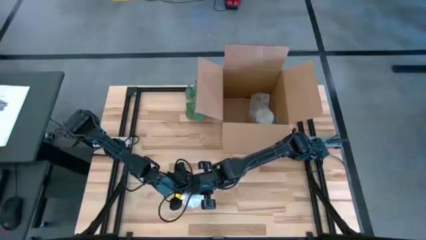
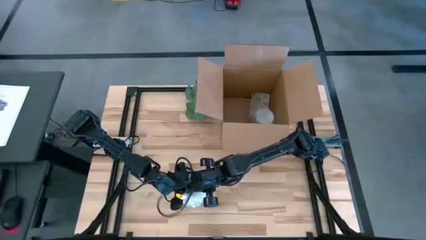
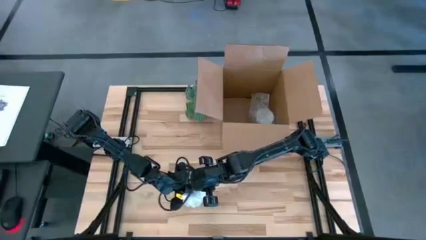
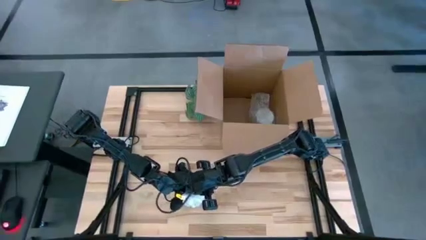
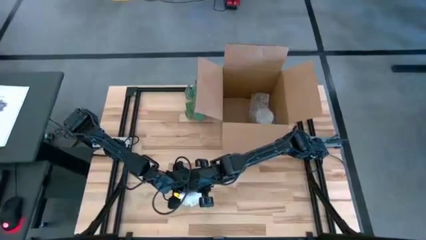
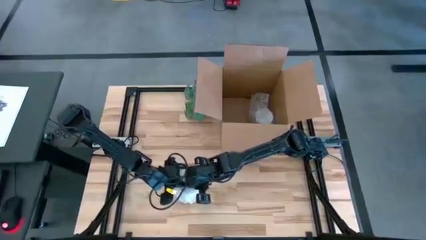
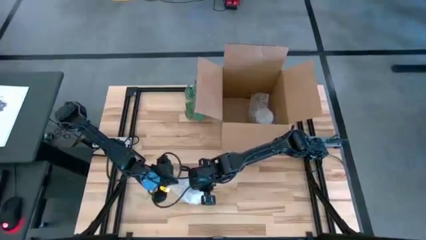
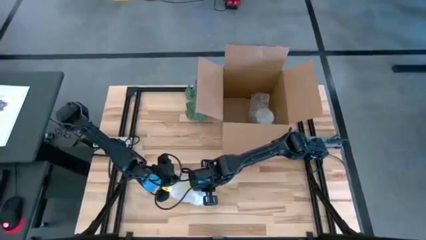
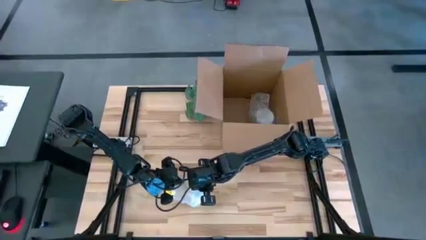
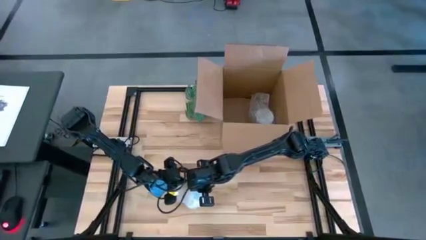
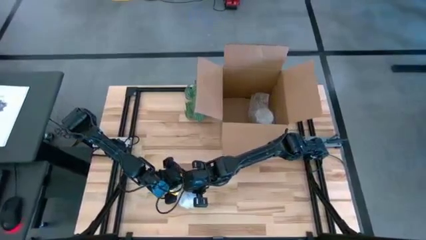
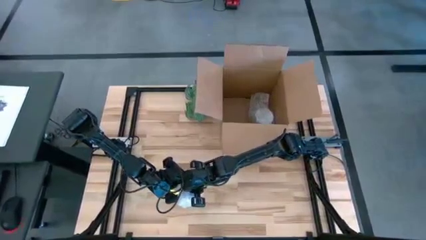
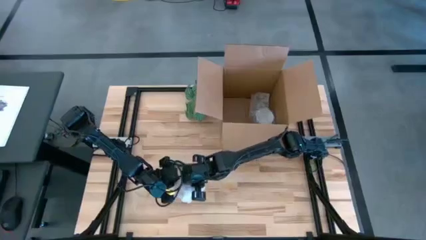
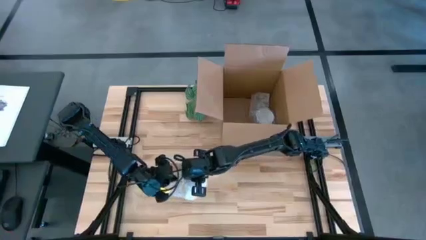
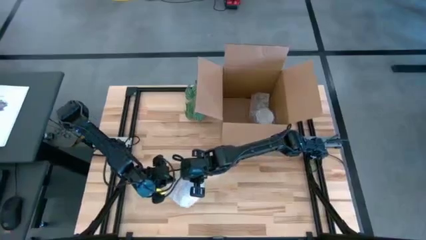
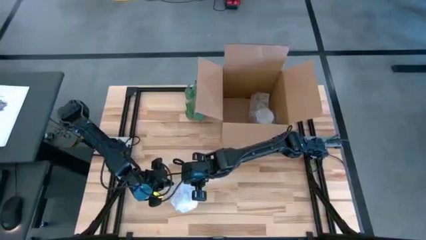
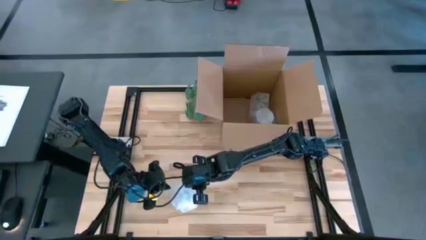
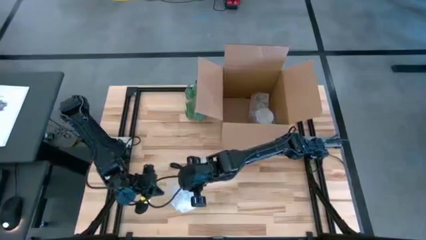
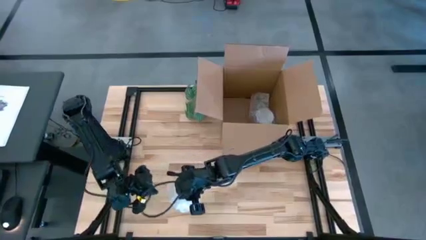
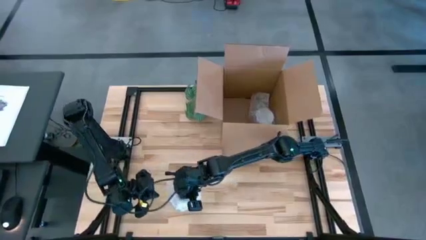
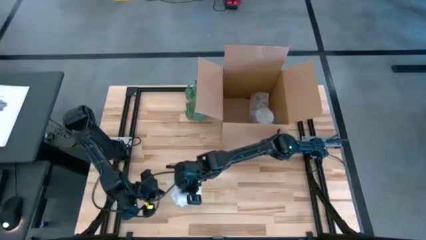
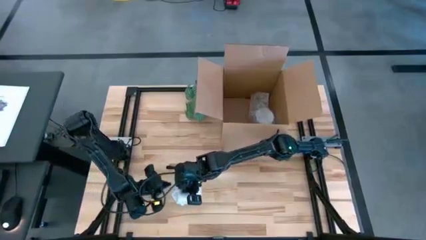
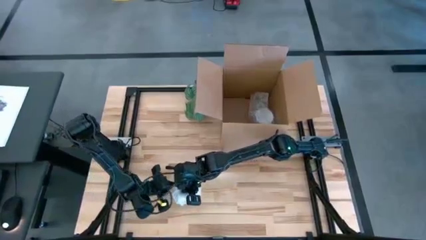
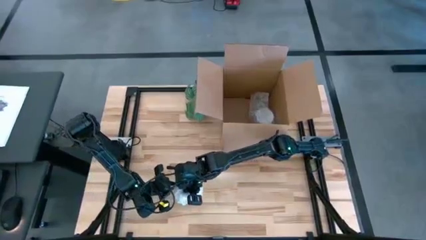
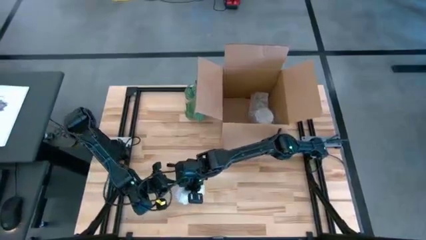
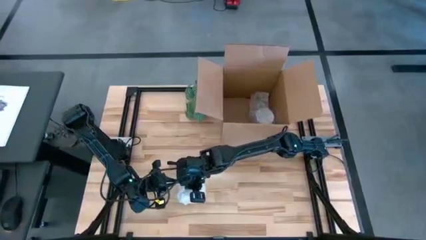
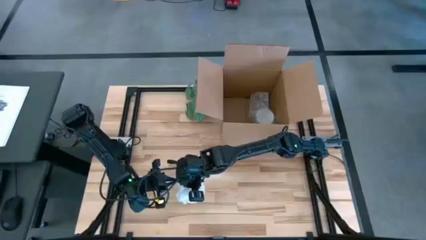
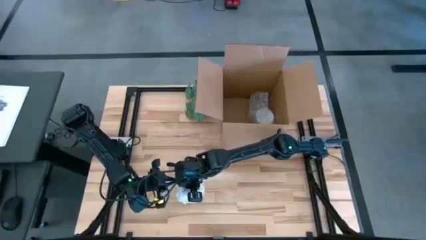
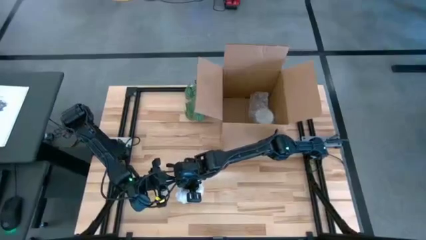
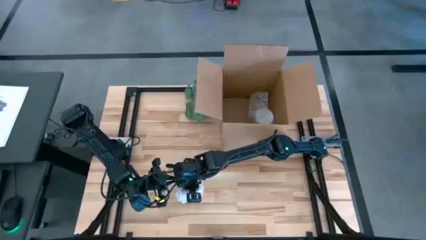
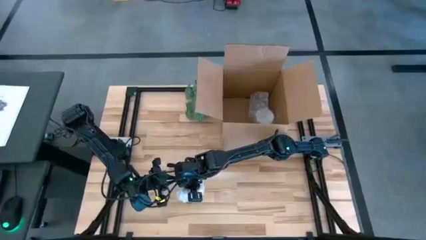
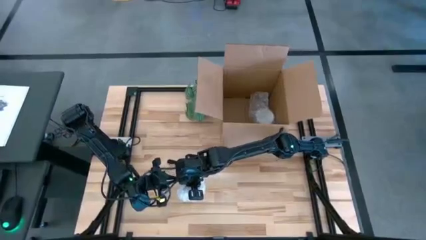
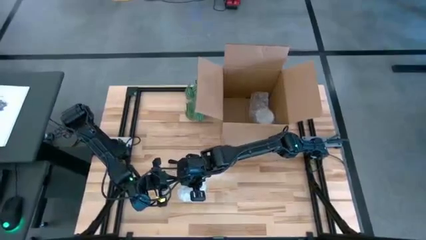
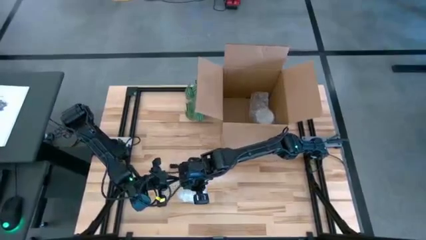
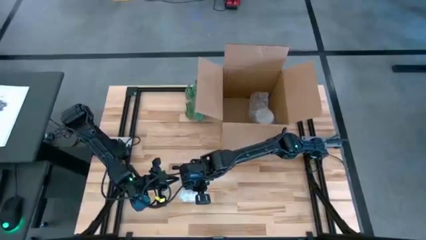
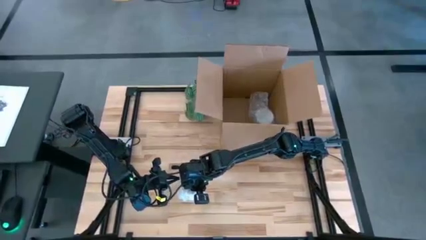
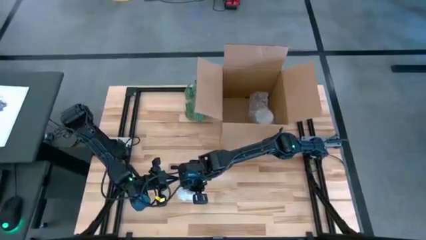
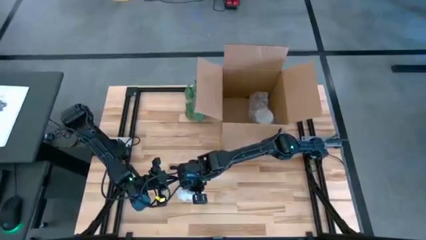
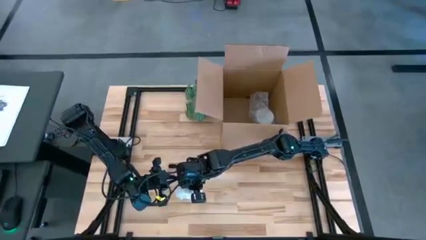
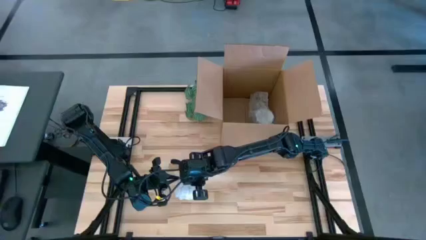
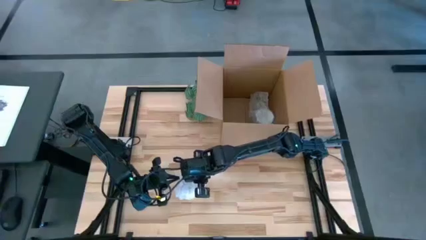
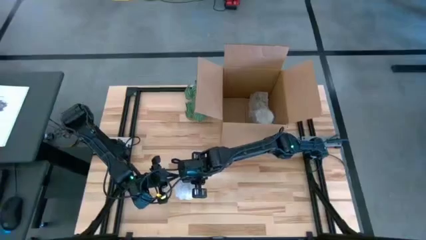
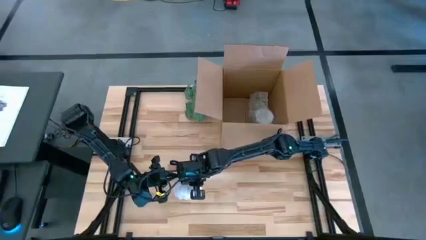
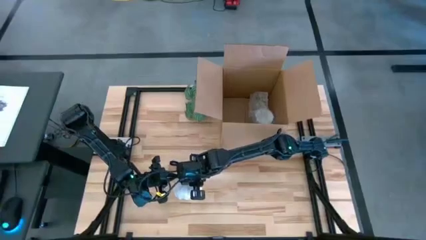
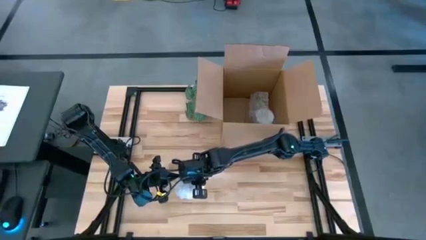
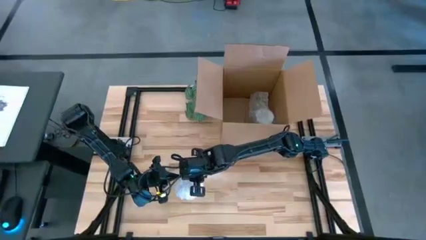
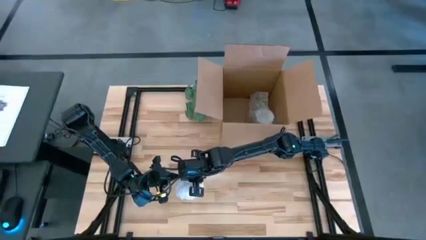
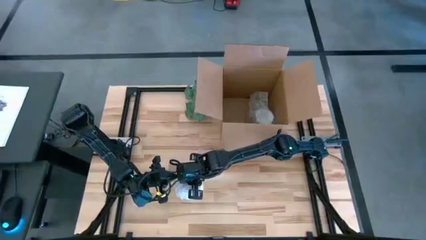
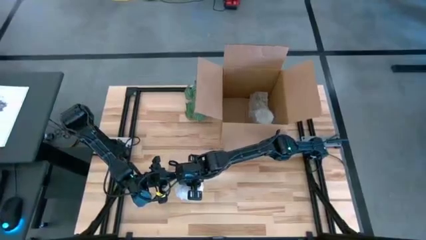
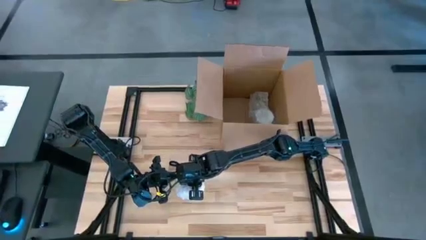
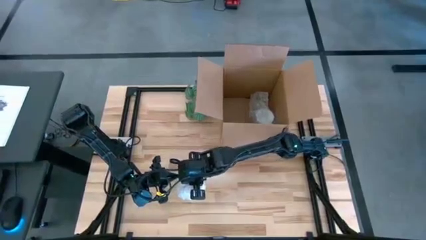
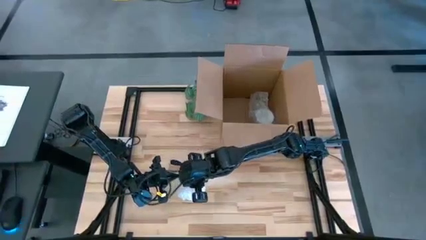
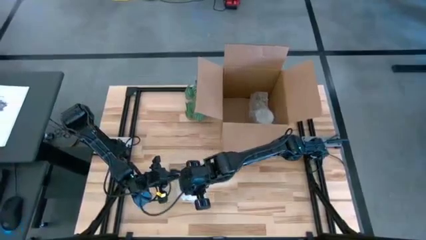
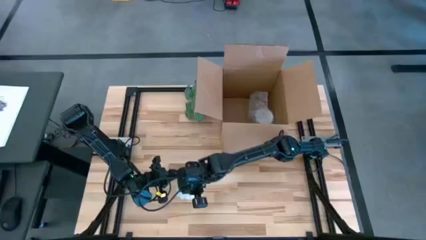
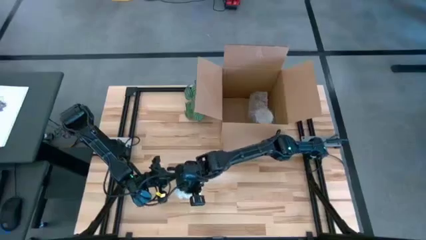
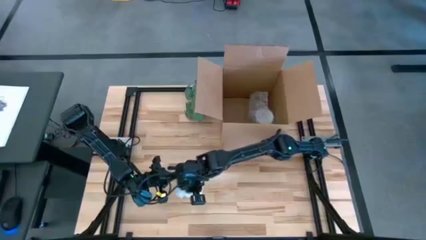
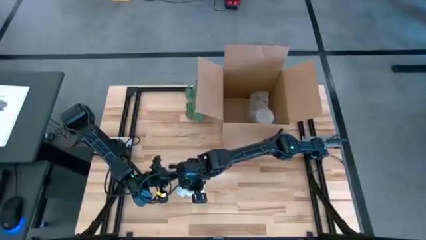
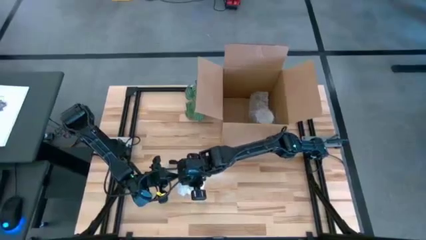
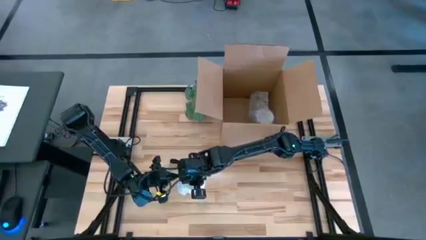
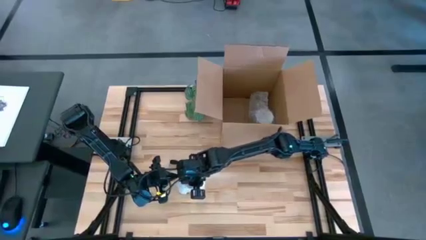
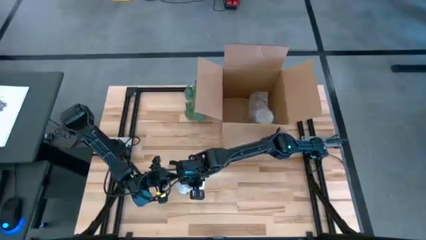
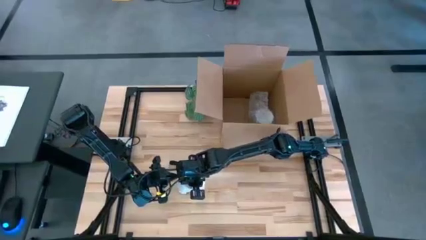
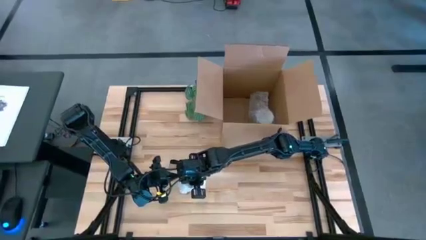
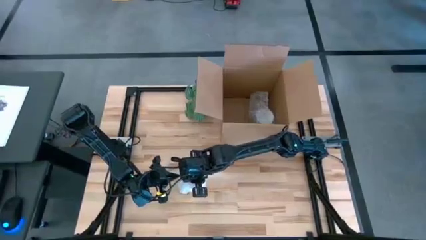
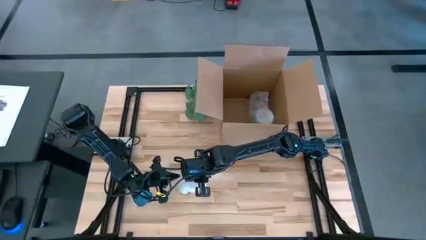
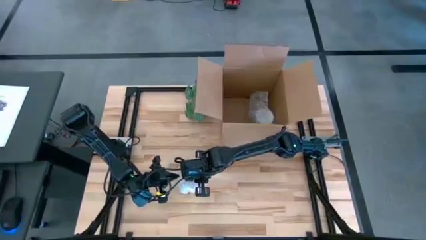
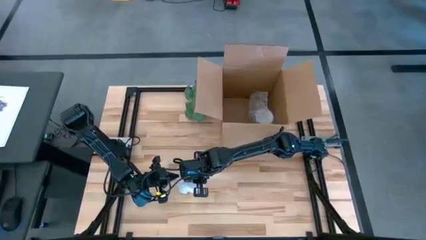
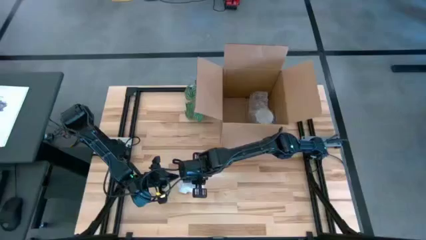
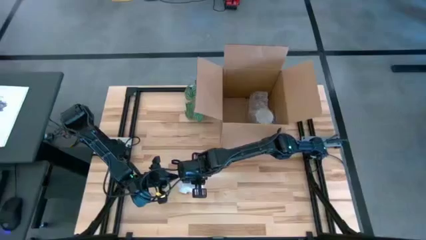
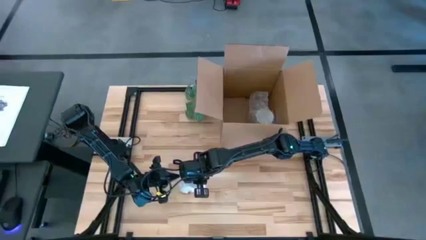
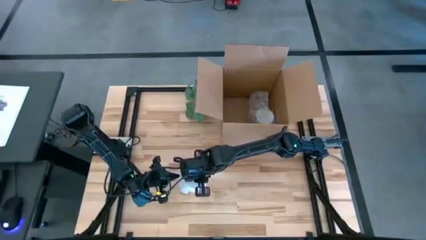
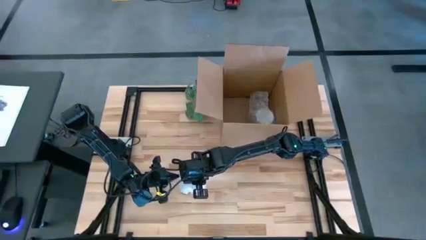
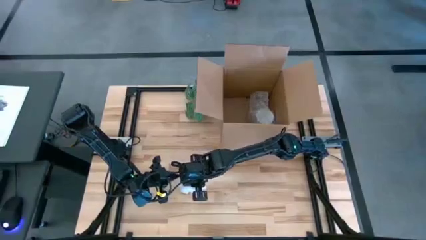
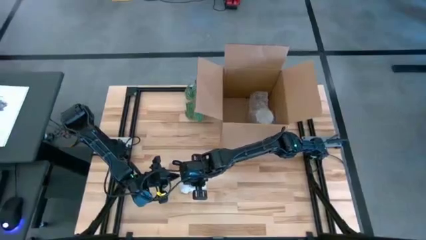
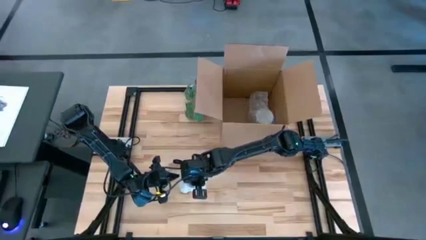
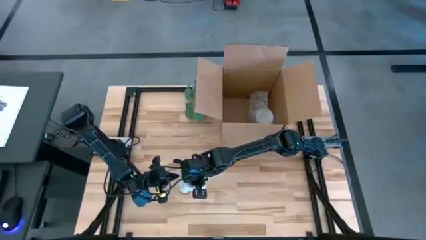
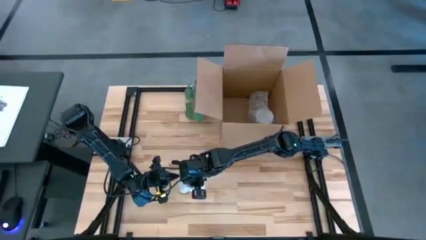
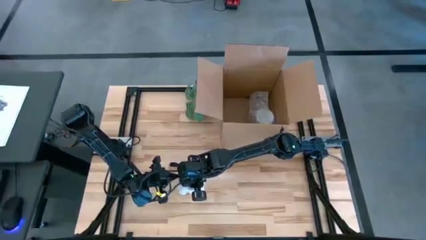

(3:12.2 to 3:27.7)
Task: wrap mug
Wrap the orange cup with the bubble wrap

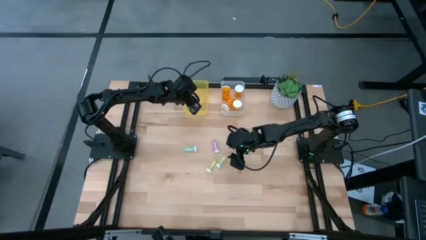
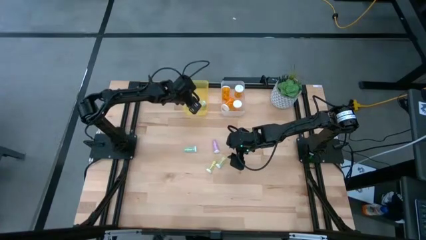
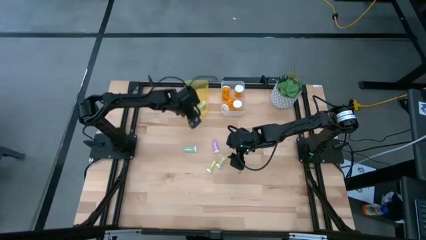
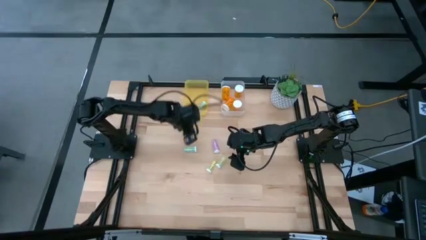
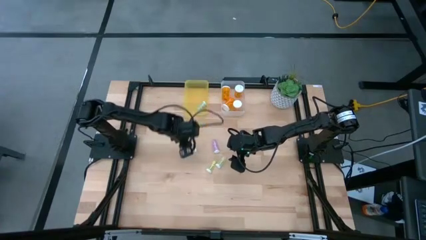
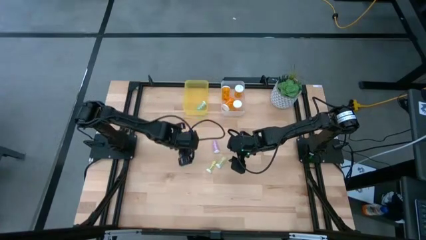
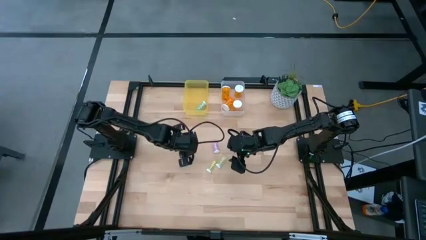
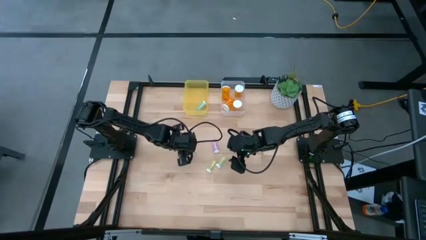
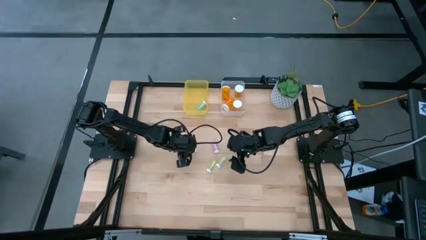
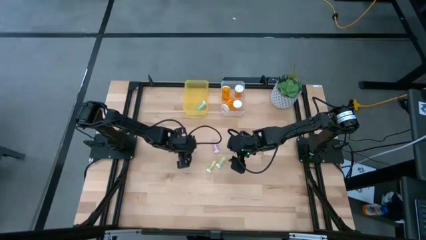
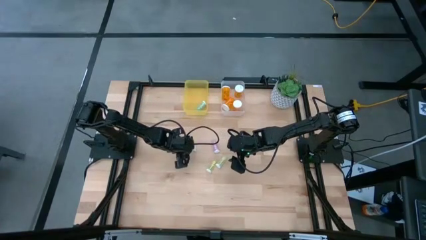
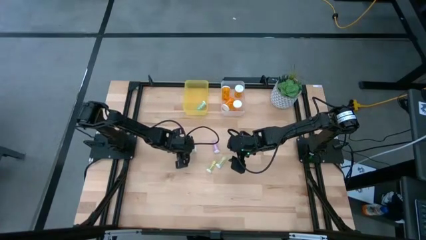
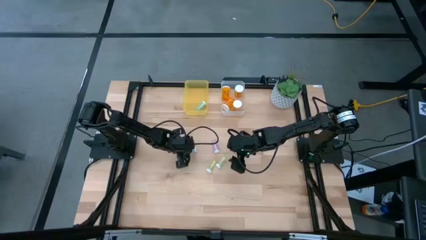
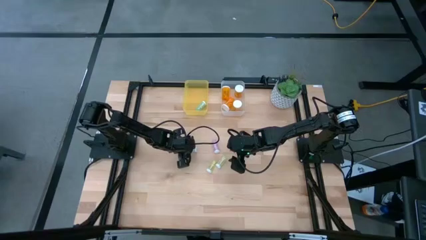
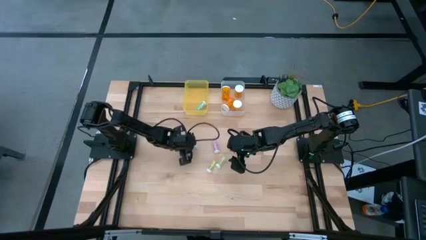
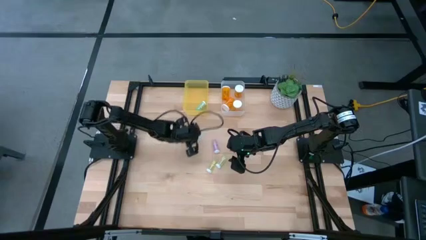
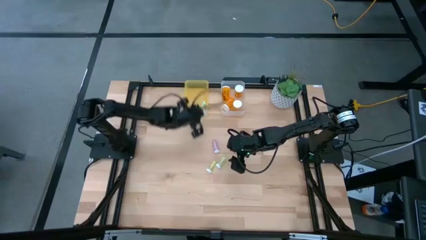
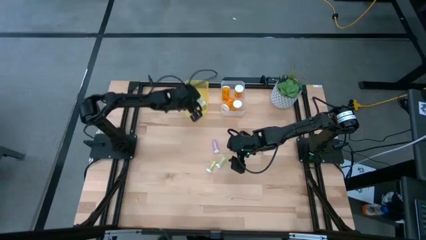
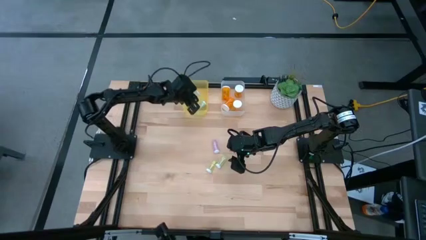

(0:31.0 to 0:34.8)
Task: Pick and place medicine bottles into bin by pill shape (circle, oval)
Put the blue tablet bottle into the yellow bin
